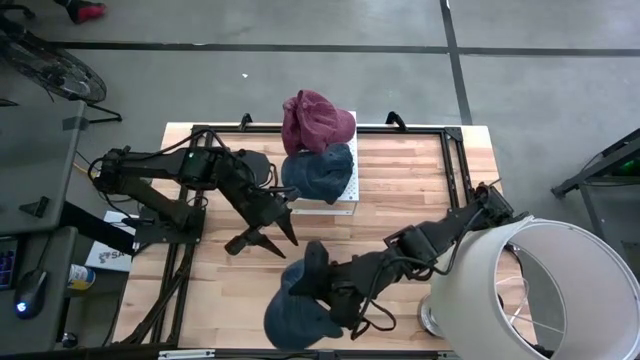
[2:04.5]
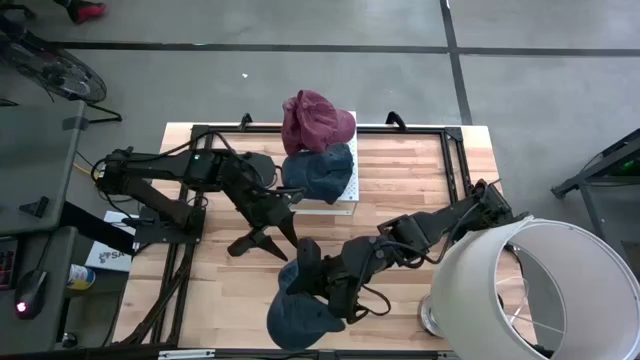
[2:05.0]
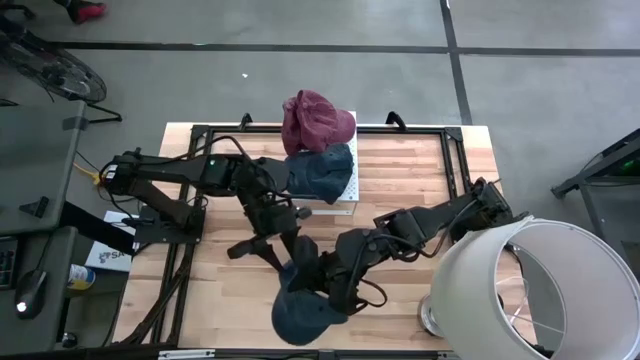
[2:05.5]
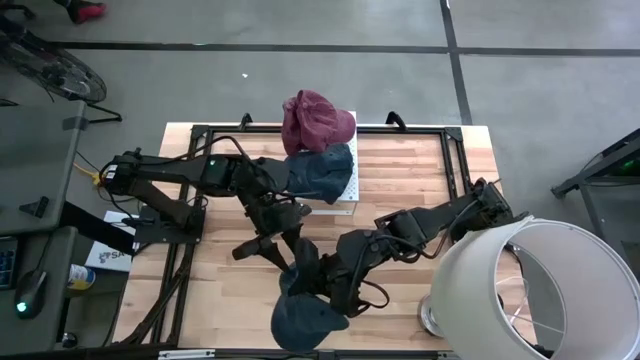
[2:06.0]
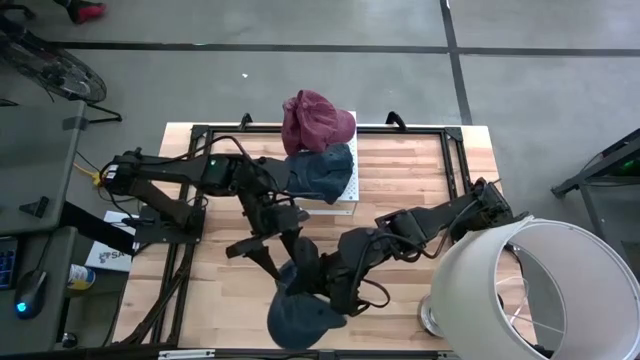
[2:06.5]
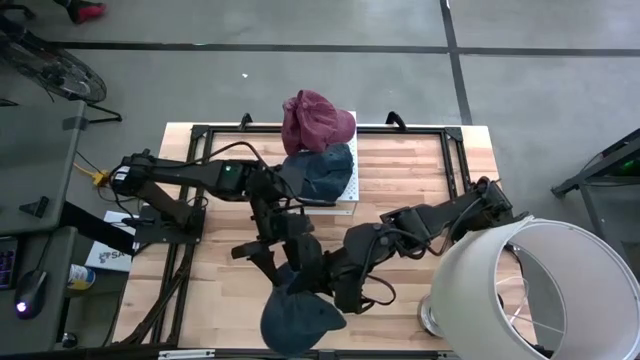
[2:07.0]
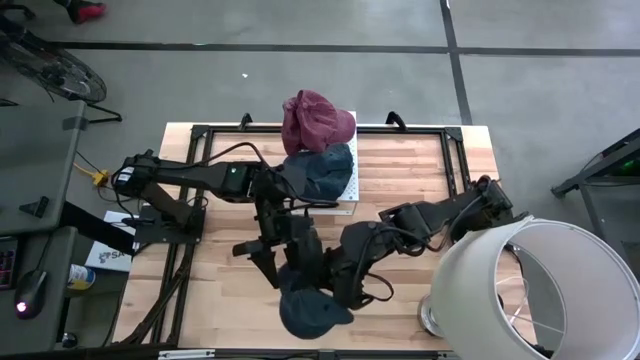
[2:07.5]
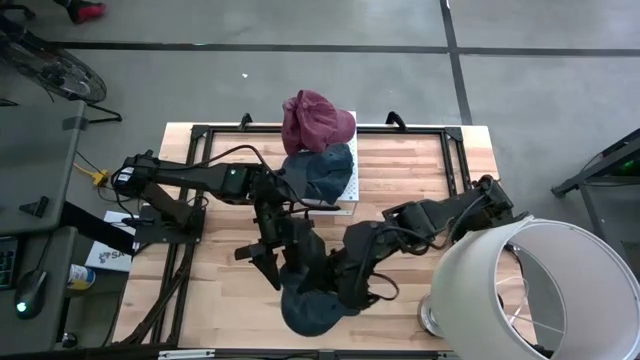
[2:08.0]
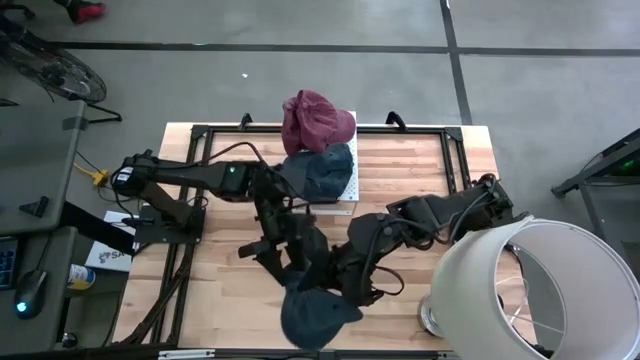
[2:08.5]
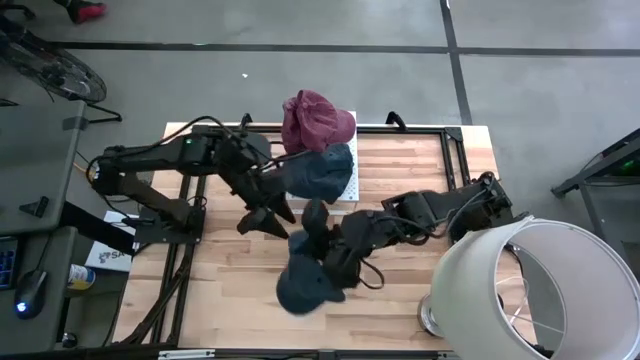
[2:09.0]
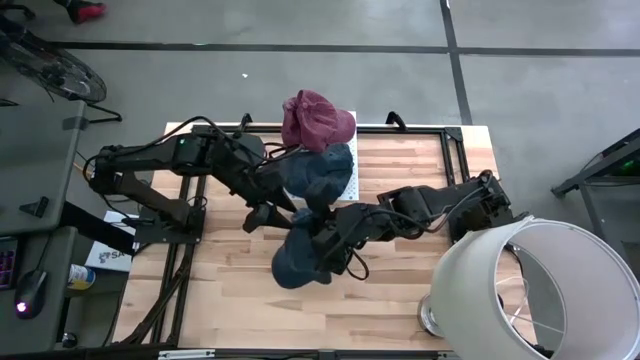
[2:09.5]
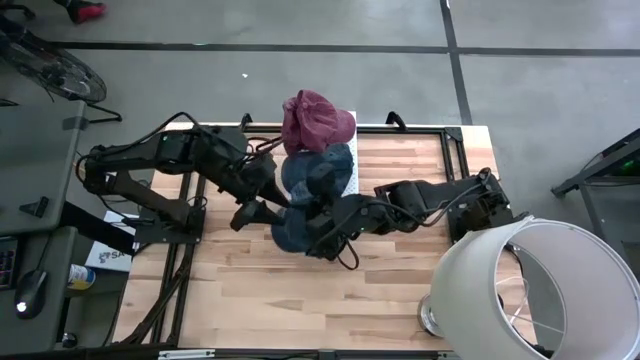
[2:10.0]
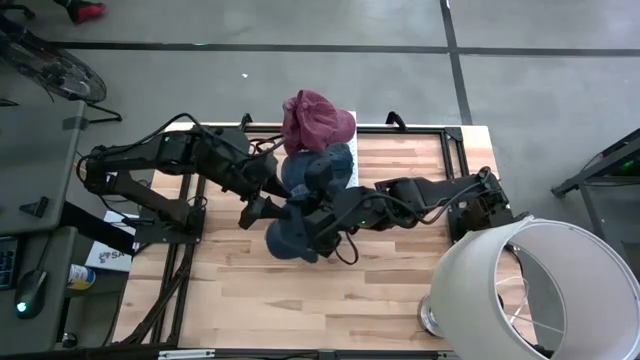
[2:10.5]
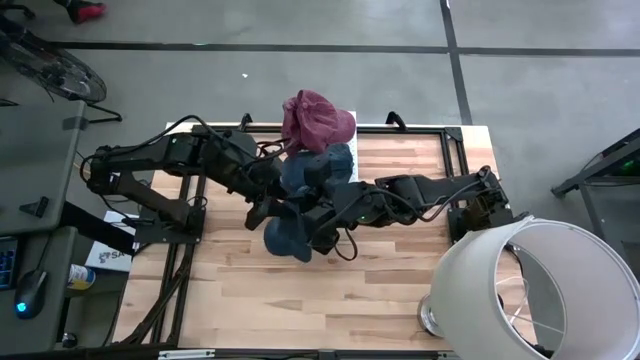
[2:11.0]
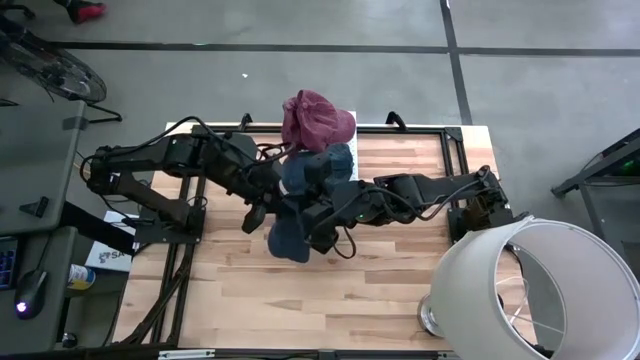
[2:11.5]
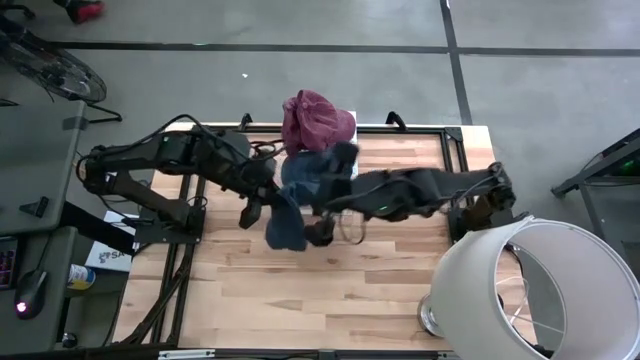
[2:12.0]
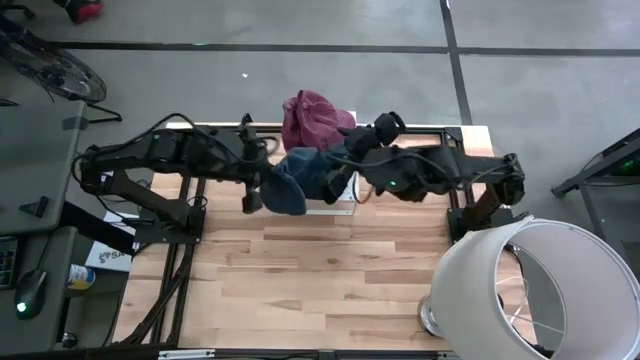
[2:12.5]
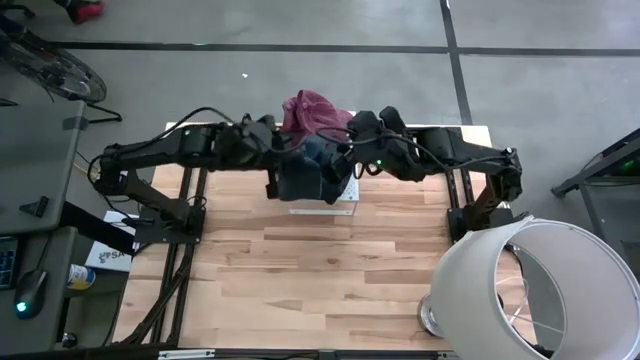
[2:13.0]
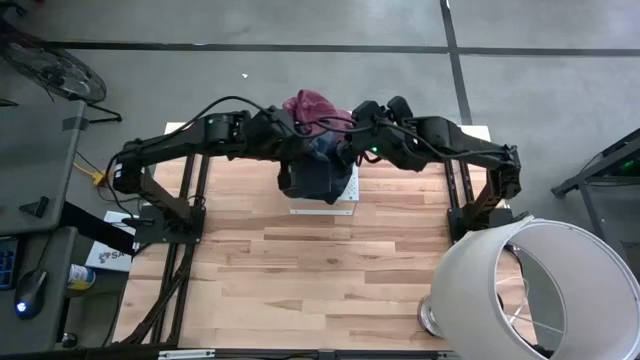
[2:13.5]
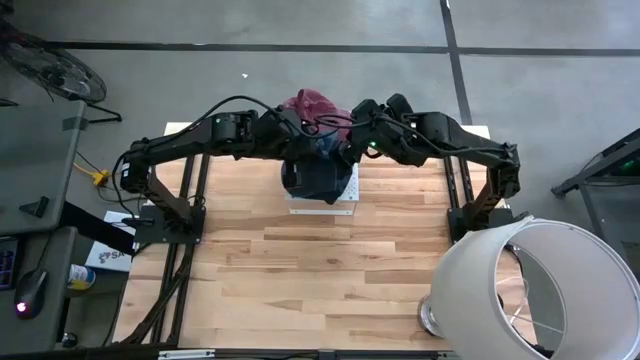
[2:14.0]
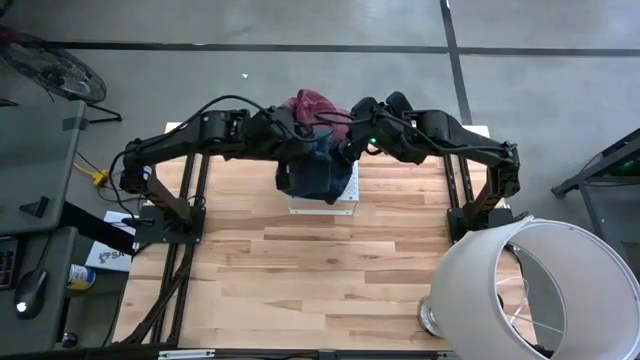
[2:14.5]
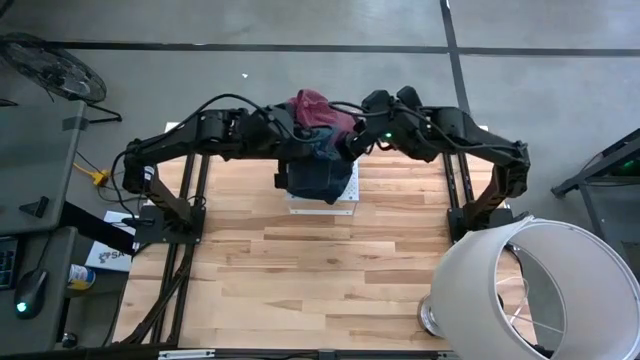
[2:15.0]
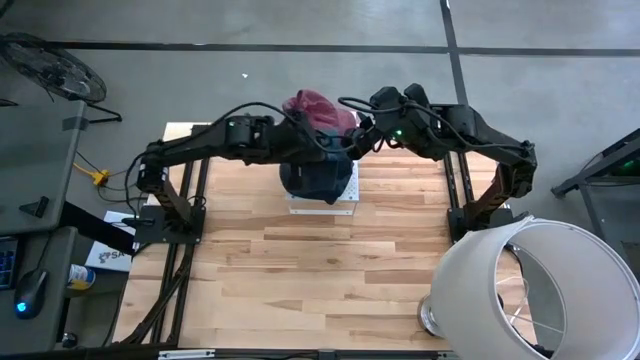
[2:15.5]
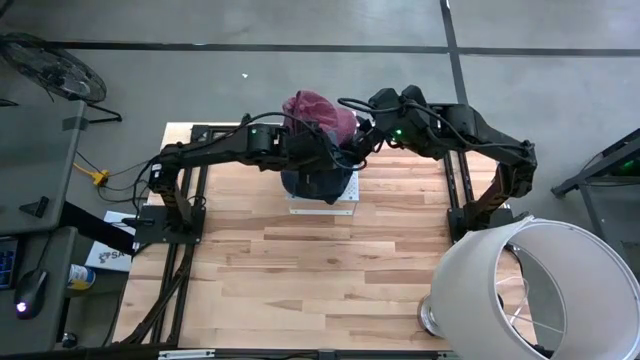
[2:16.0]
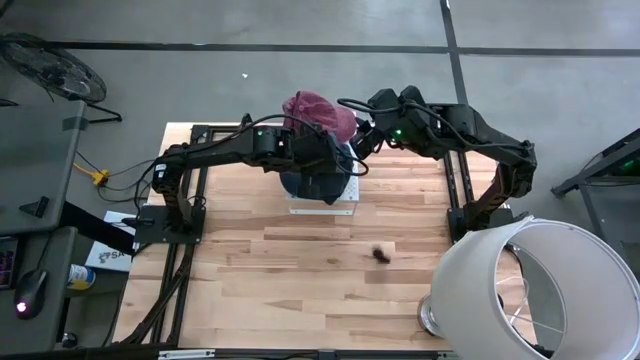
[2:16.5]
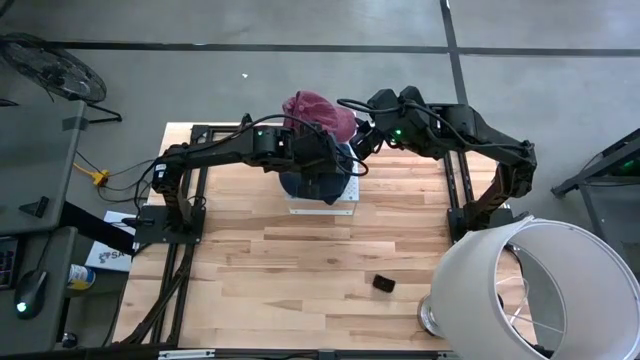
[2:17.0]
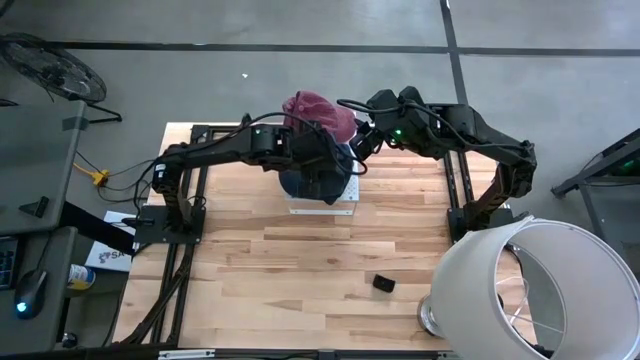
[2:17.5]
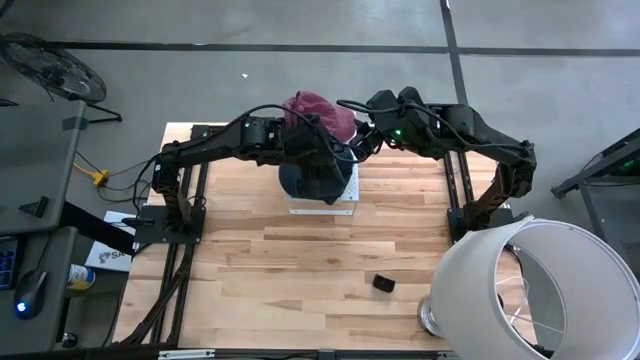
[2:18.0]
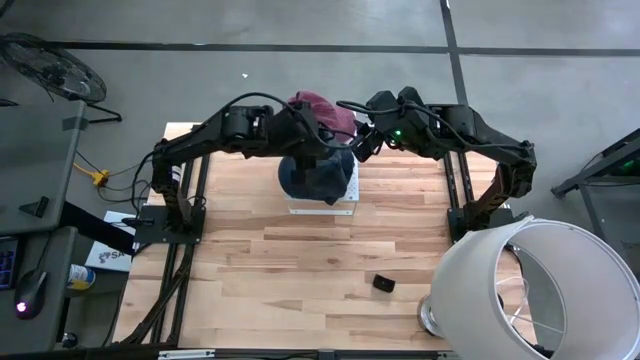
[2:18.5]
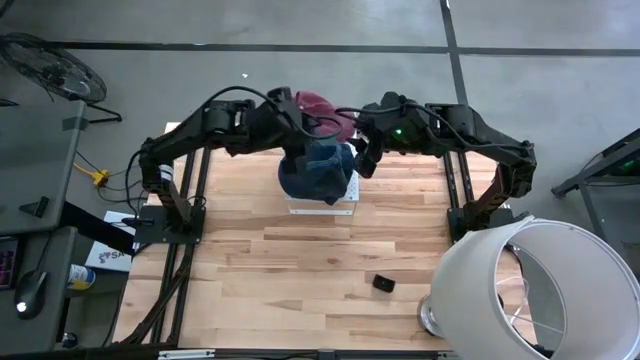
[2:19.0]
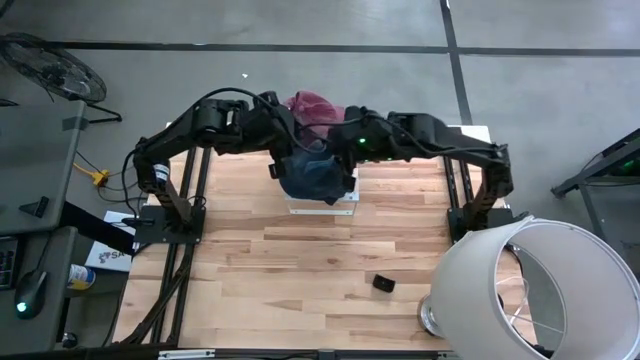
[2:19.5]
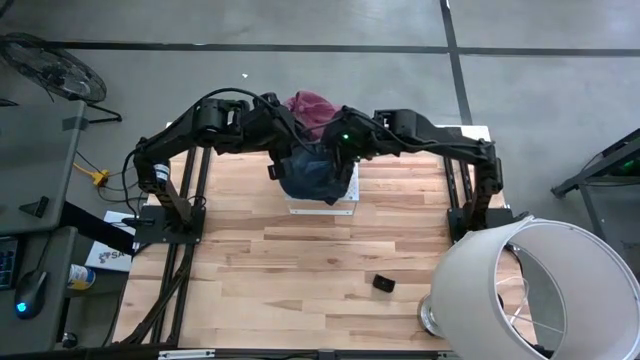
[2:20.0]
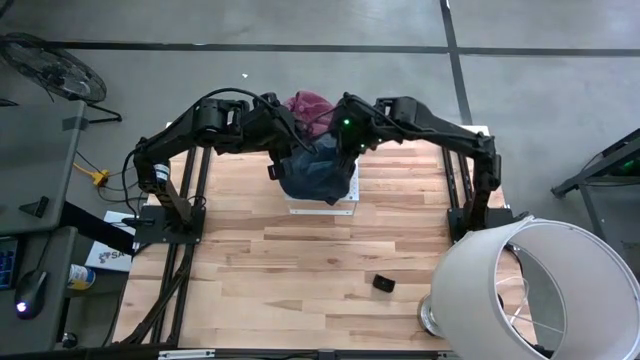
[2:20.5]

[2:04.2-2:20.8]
Task: Pick & Place hat
Stack the blue cap on top of the other blue cap on the shelf
